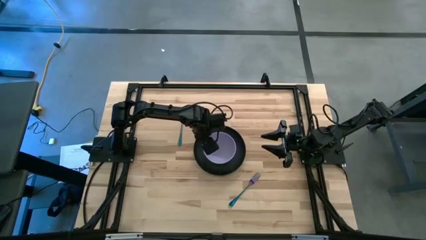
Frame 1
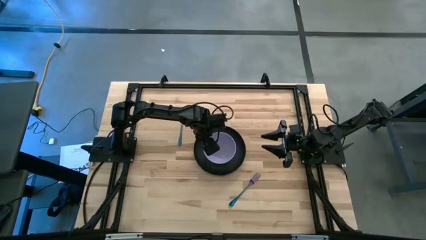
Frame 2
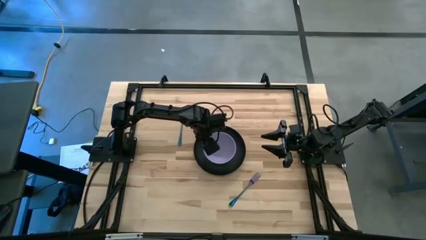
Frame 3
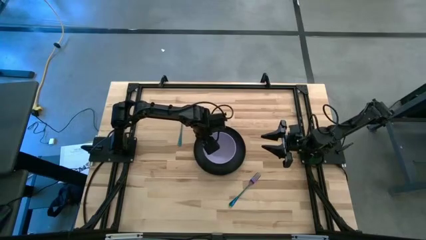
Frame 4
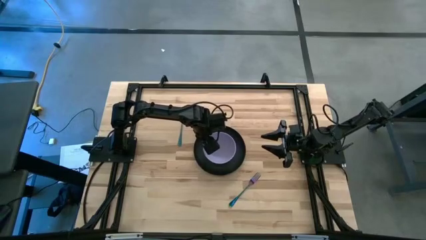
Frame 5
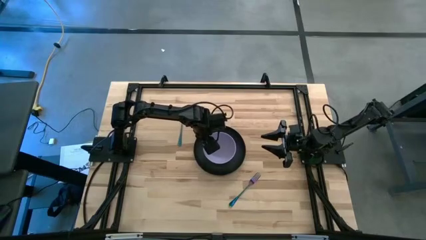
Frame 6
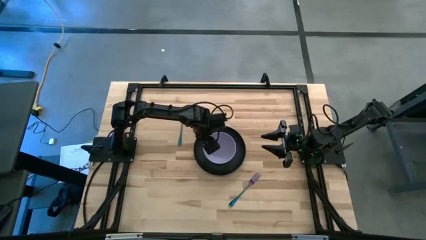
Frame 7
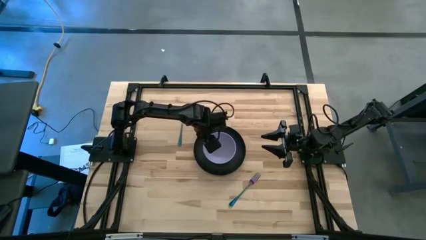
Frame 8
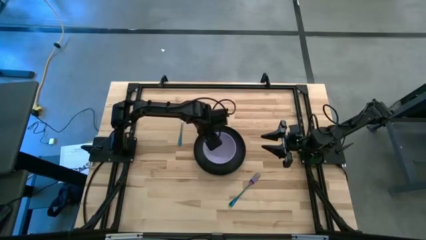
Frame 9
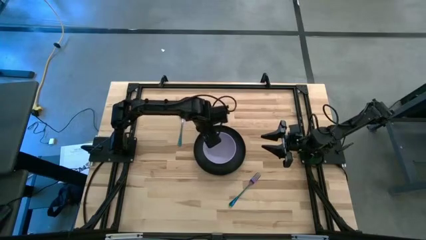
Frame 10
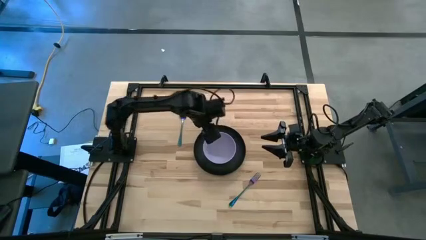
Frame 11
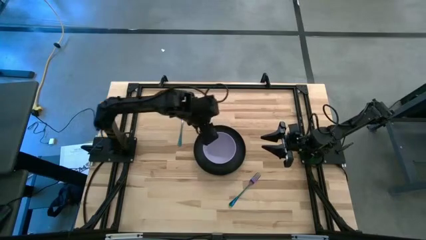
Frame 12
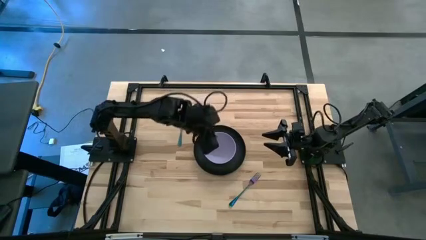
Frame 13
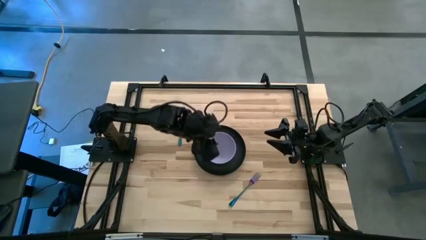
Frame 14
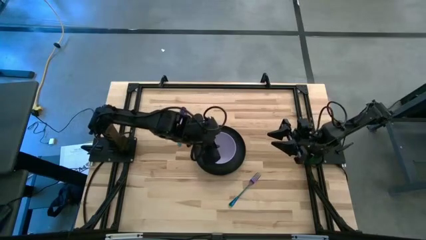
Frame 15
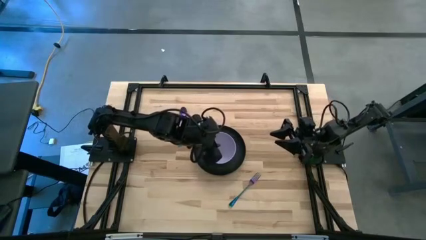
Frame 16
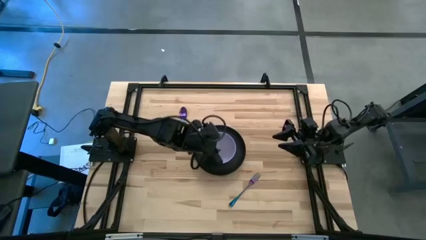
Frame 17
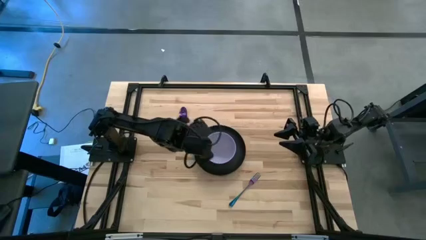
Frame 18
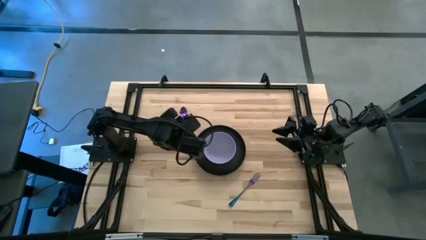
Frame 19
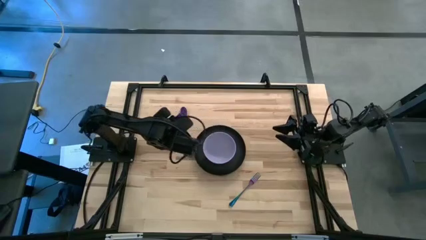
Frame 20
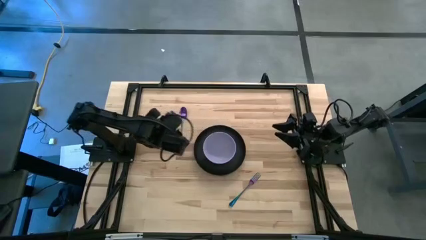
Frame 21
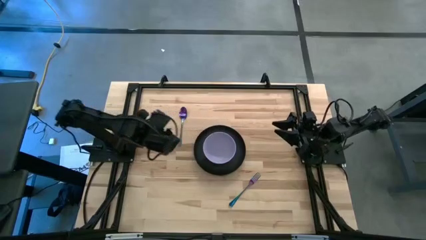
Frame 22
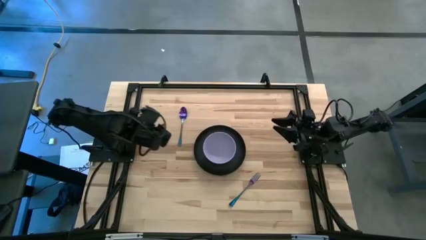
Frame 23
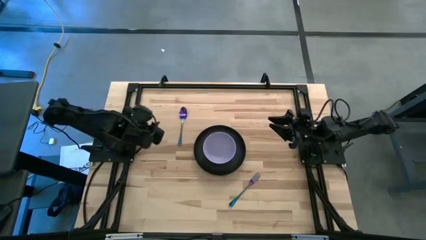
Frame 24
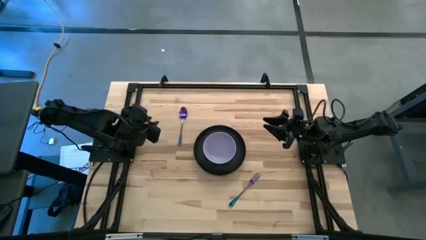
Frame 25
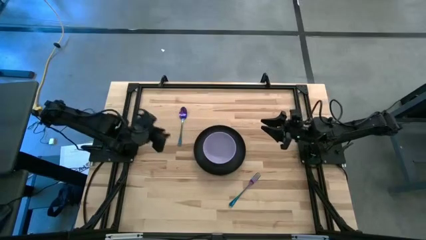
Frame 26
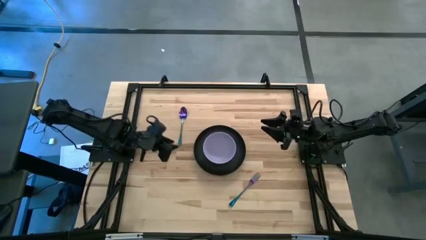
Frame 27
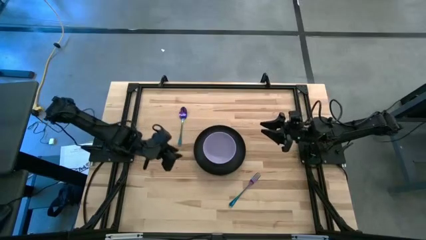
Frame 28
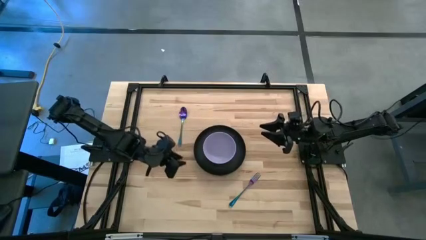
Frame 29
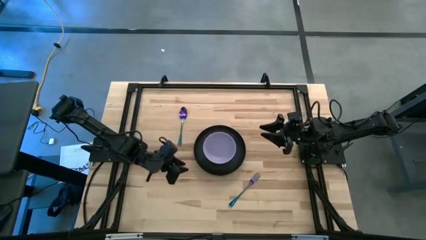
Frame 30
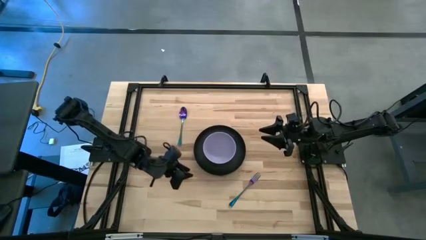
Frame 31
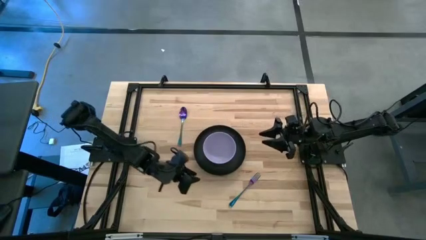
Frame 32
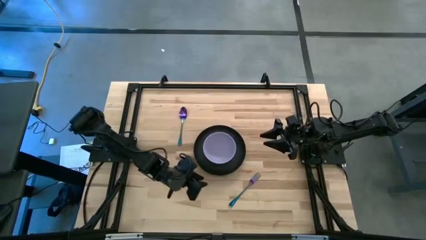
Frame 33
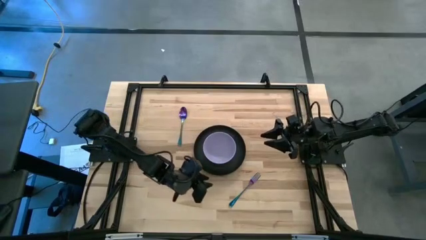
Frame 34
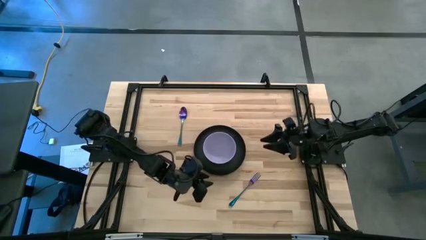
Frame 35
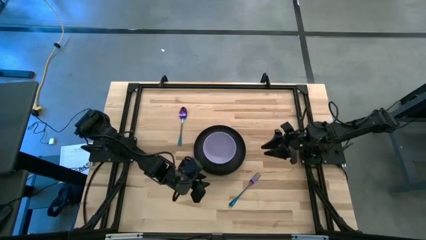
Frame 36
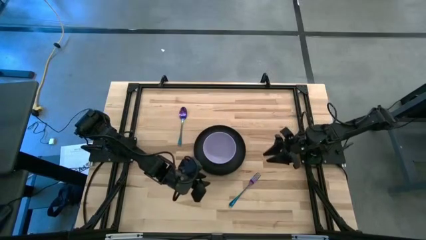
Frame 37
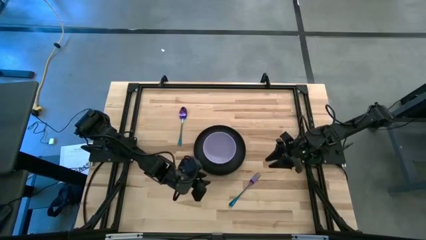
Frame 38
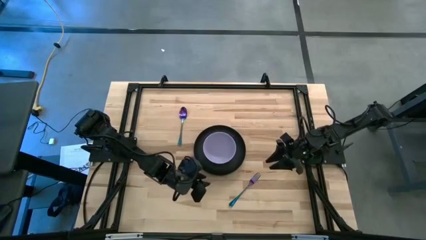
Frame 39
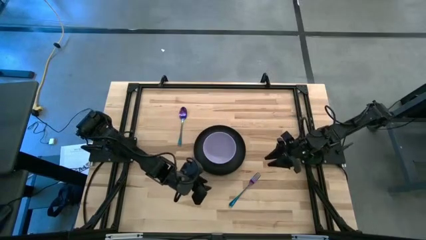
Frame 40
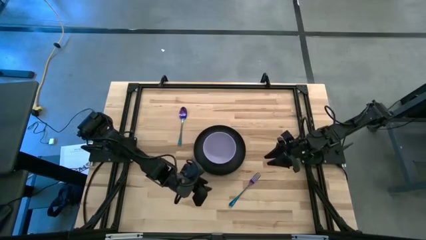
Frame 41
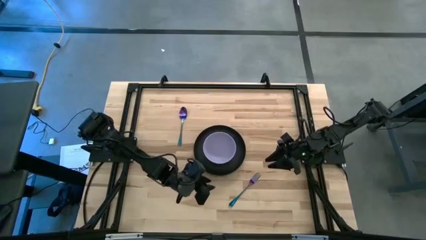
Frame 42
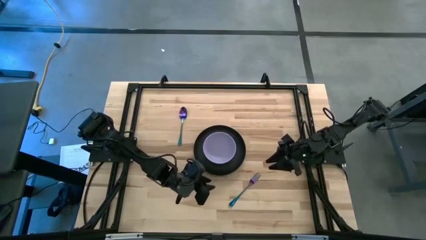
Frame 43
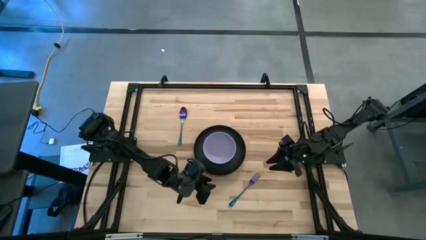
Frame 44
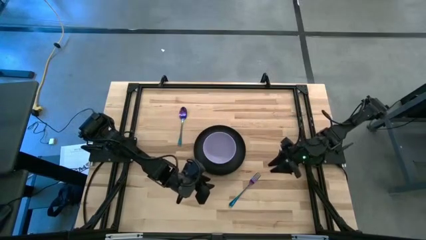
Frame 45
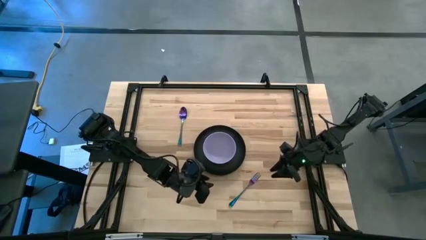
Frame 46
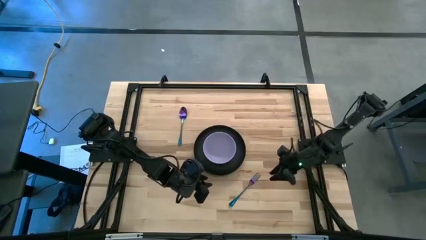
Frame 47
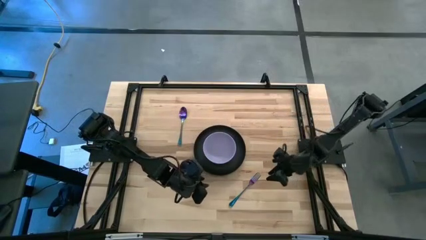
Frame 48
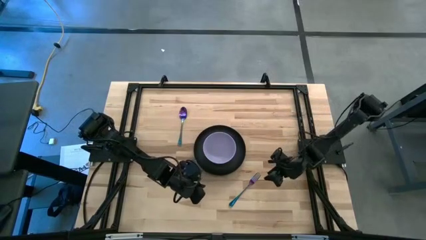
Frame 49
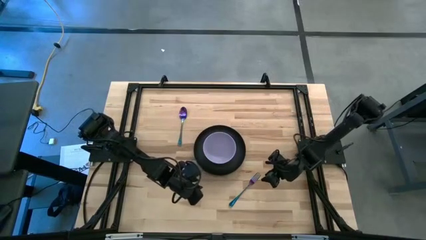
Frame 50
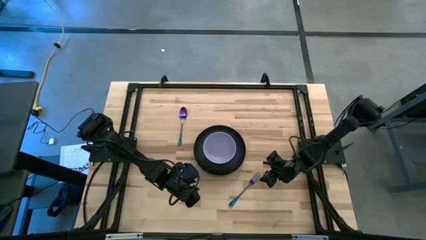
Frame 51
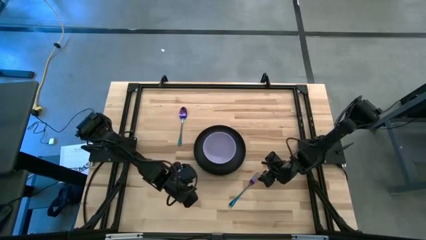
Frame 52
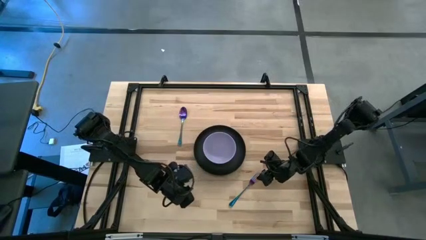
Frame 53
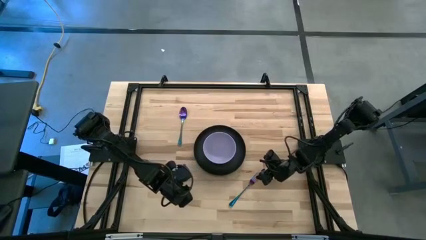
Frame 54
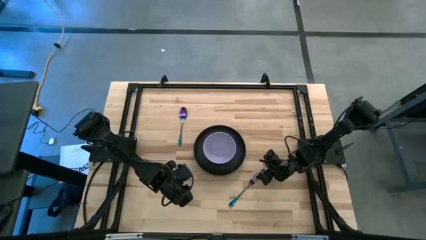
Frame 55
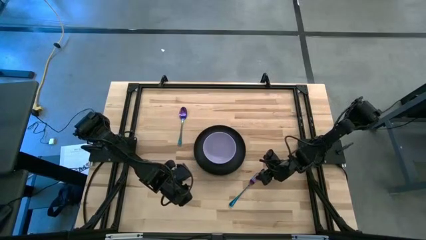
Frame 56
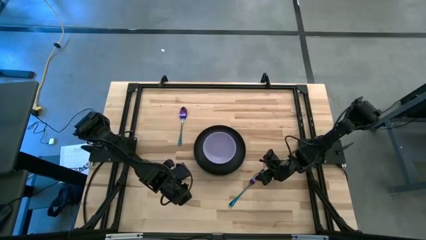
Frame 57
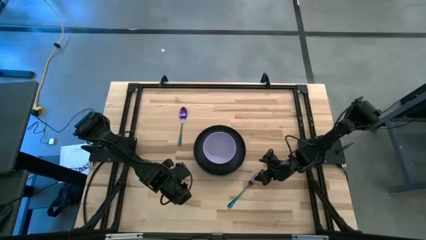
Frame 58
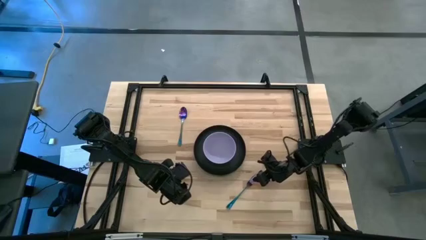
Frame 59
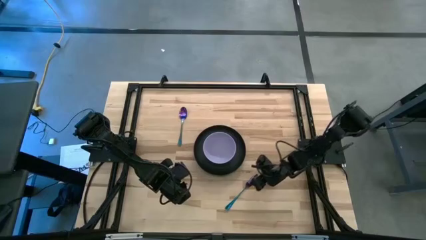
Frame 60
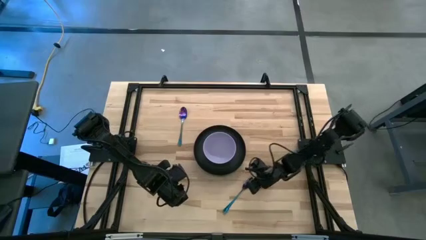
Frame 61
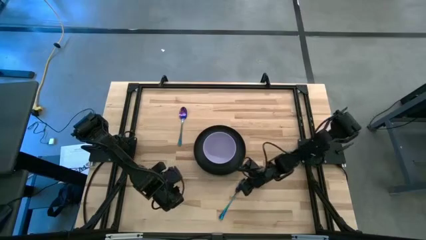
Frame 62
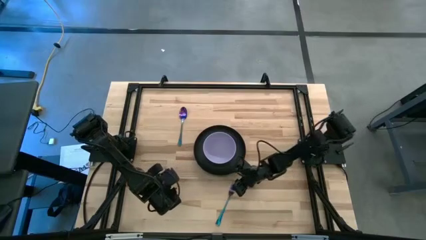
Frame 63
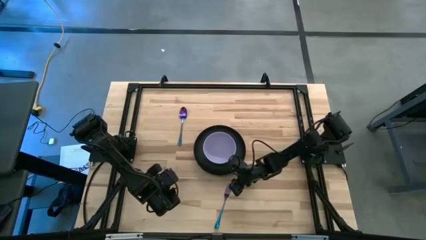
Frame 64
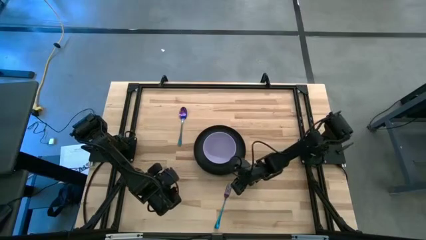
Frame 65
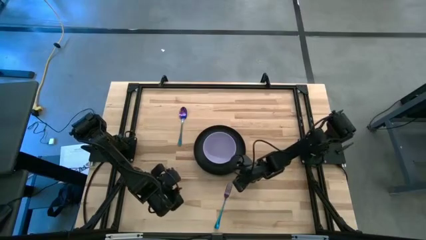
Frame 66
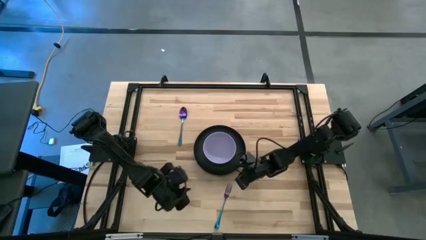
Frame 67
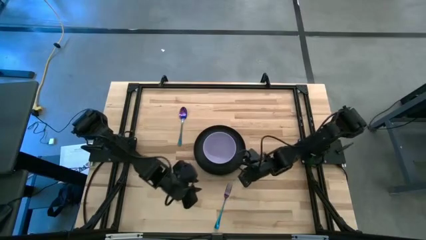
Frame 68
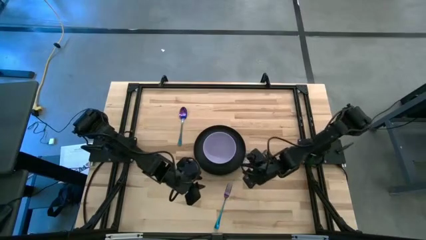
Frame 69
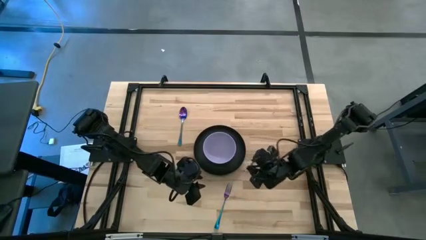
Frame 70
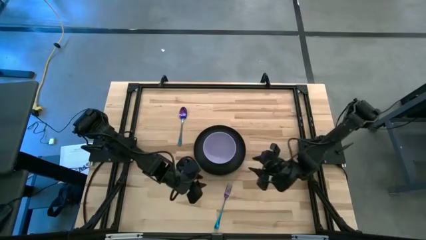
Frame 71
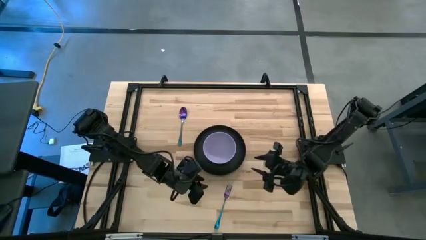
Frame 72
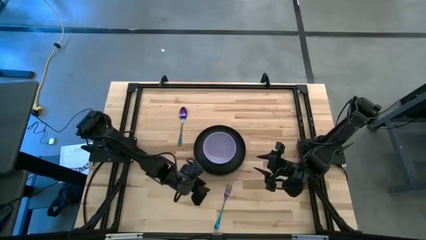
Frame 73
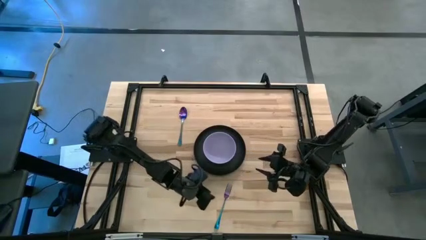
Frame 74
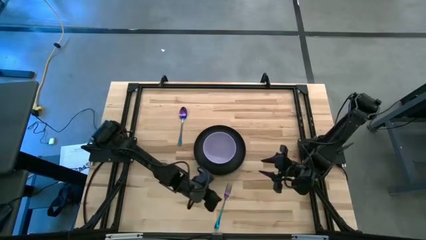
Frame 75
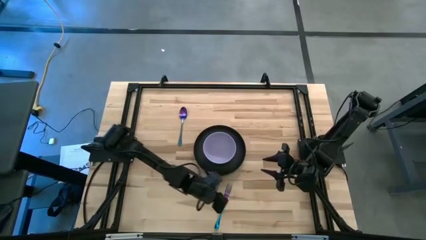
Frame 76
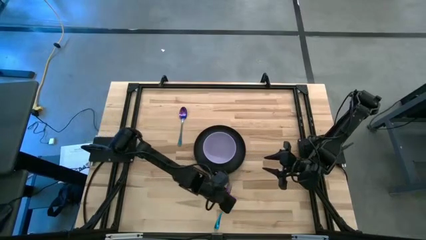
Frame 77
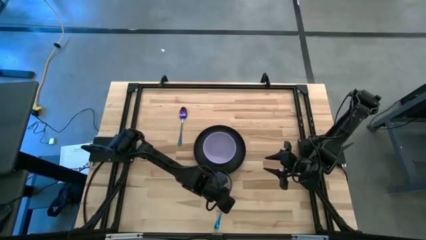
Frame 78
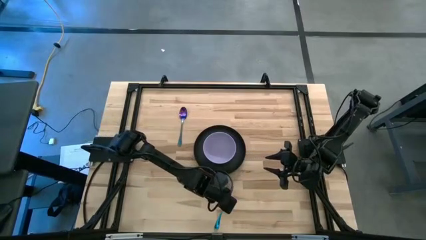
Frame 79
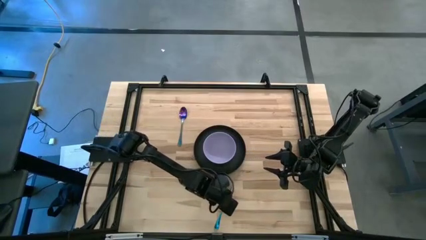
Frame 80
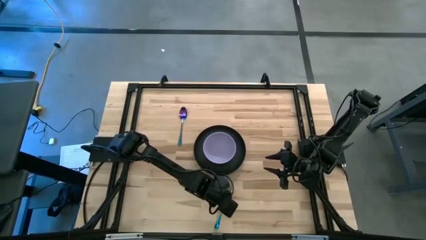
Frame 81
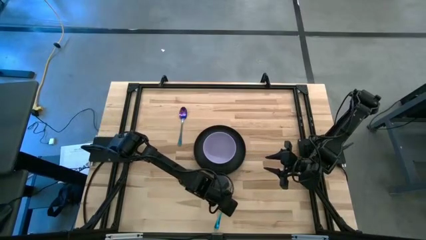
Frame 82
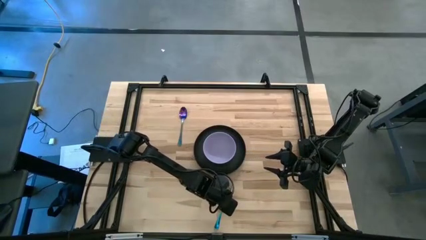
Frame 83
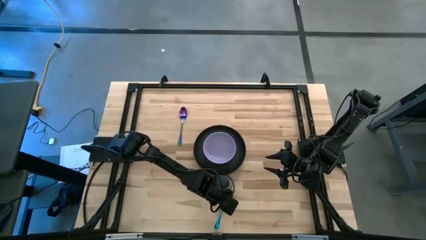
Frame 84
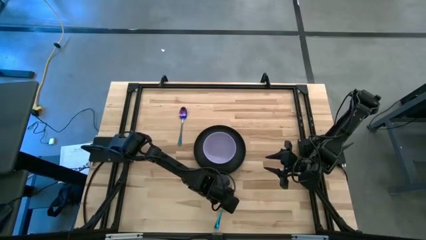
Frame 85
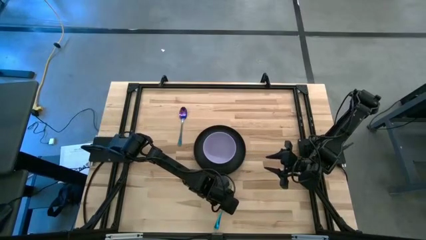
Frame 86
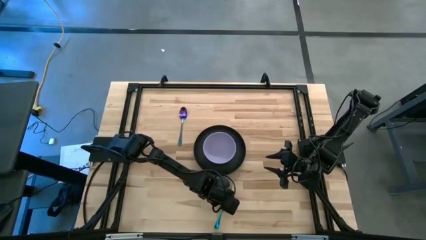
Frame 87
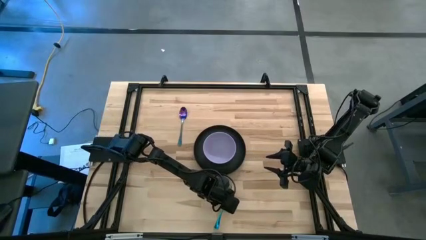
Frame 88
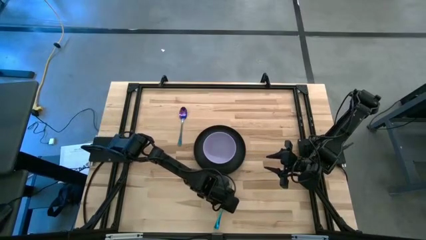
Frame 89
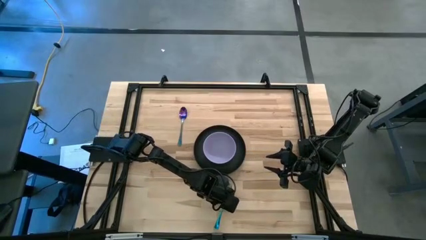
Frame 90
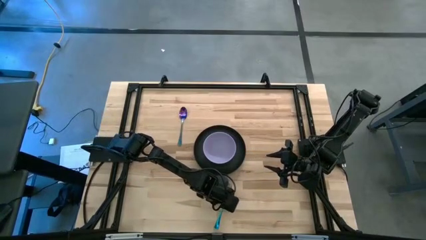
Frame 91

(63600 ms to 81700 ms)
Task: Set table place
Move the fork to the left side of the black plate
